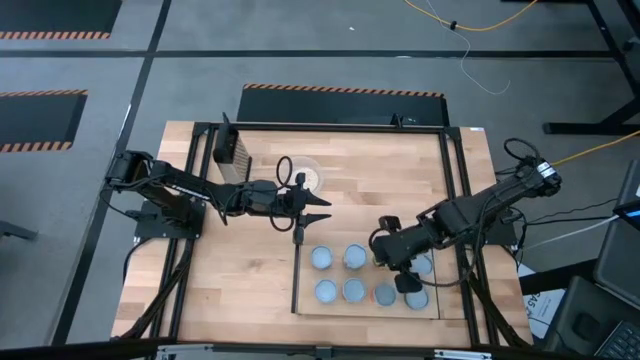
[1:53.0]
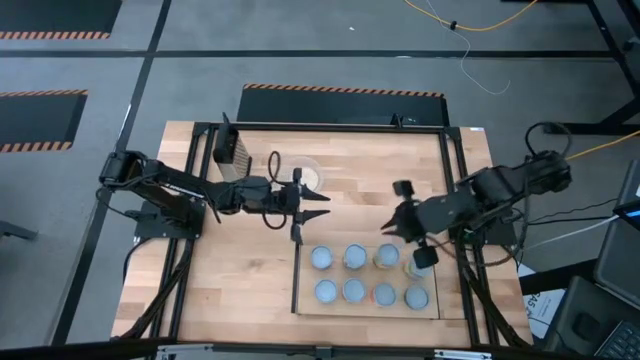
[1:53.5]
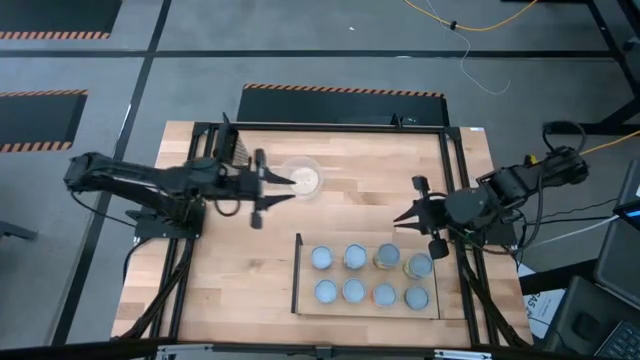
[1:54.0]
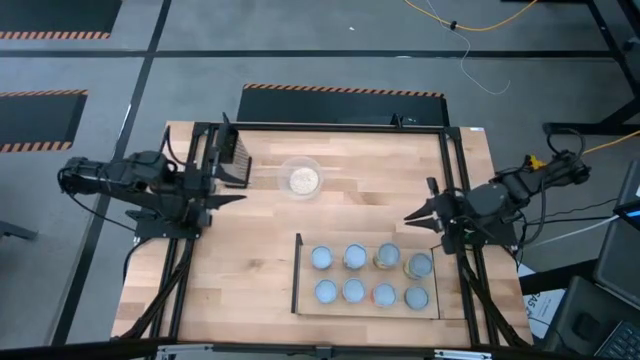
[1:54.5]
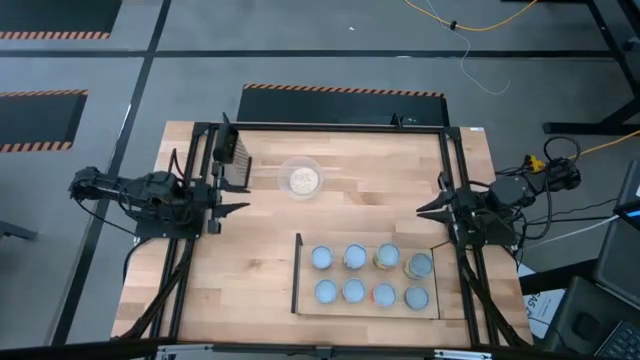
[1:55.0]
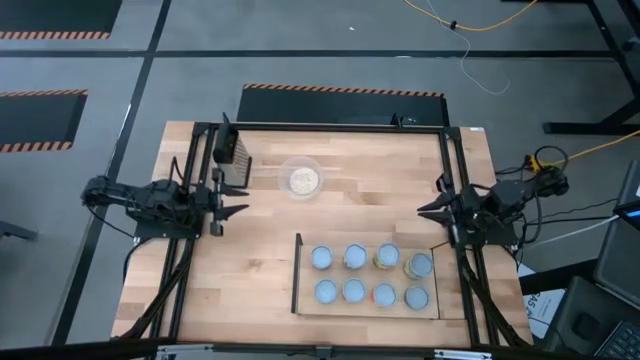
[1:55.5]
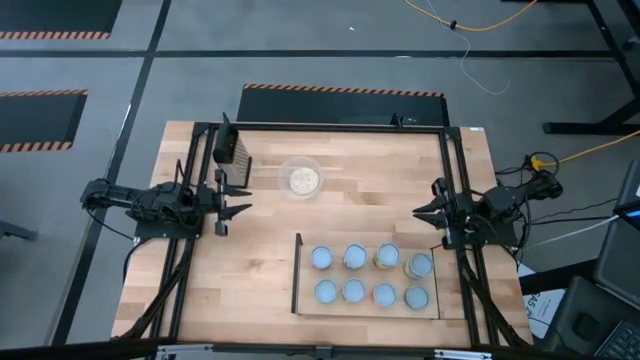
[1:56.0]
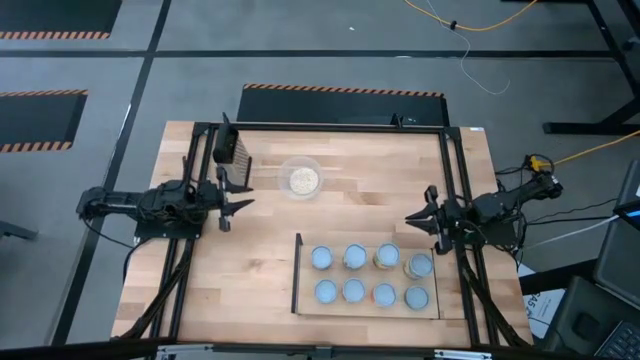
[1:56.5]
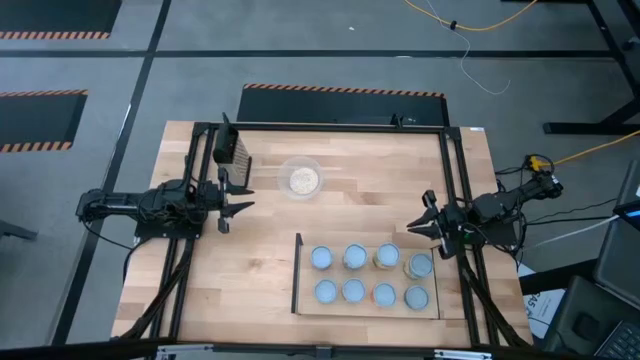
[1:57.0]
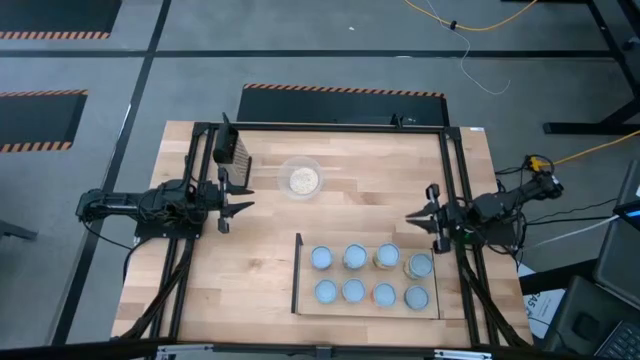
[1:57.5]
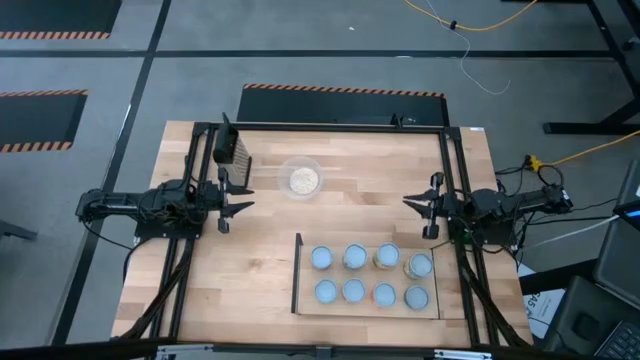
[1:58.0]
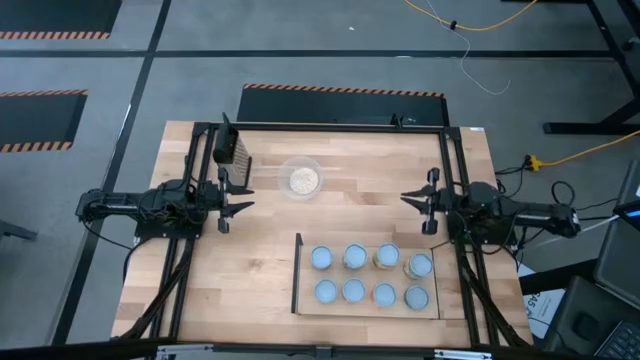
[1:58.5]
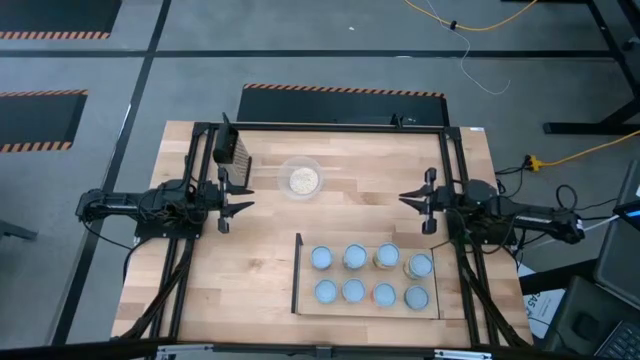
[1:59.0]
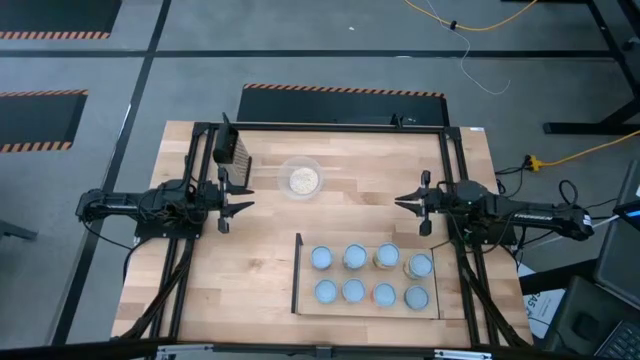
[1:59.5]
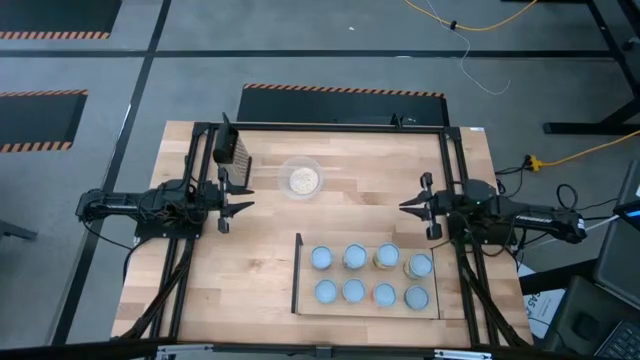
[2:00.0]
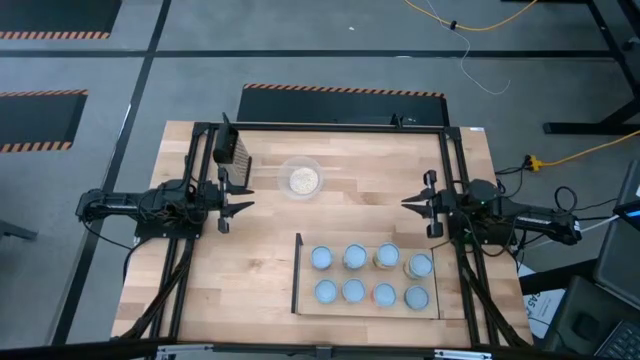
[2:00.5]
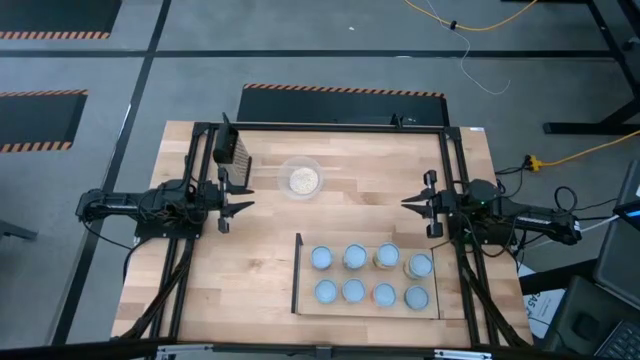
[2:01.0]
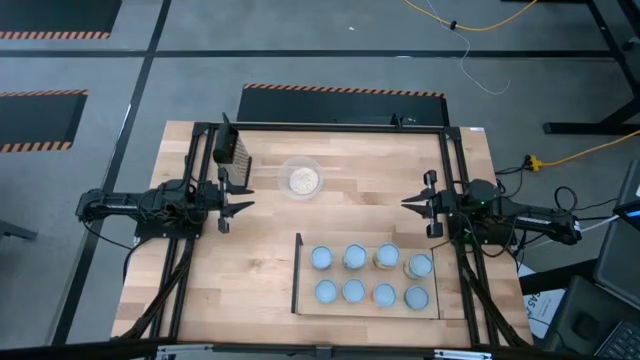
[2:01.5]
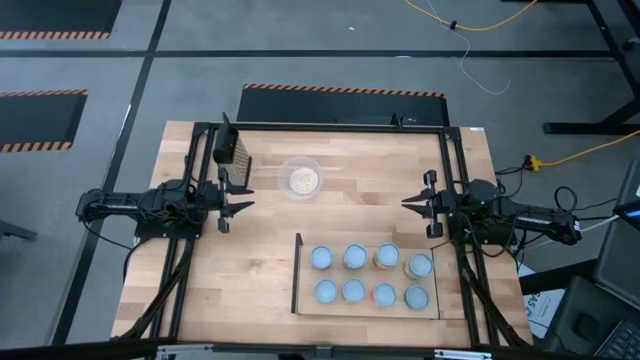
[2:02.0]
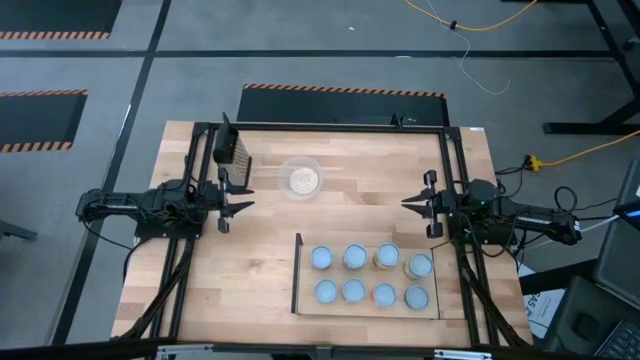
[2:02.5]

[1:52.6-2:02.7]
Task: Pick and place cans onto a shelf
Return to Home Position

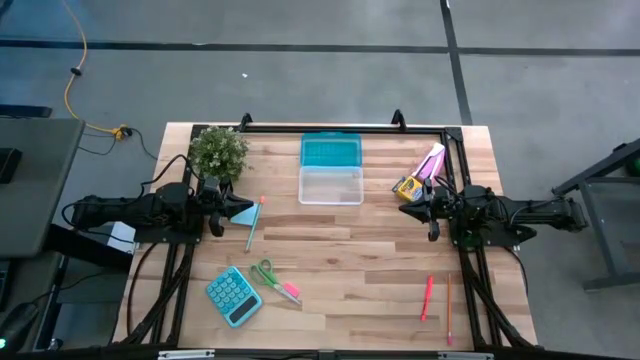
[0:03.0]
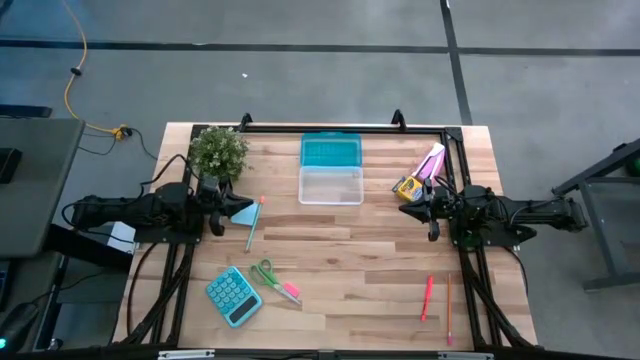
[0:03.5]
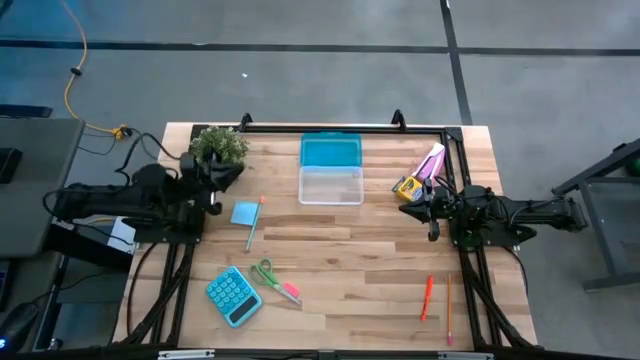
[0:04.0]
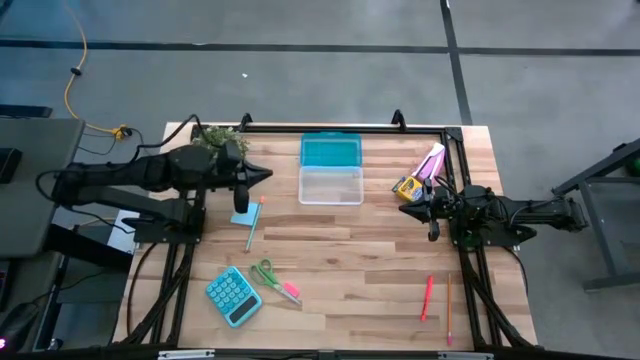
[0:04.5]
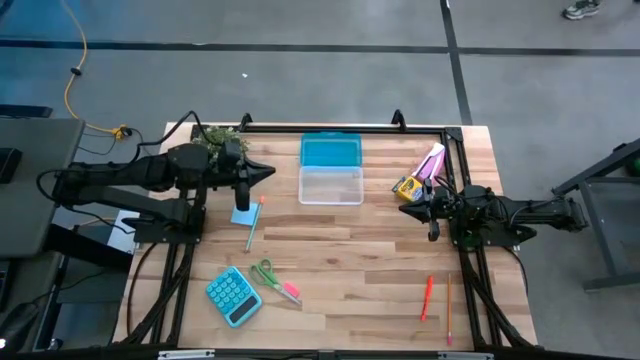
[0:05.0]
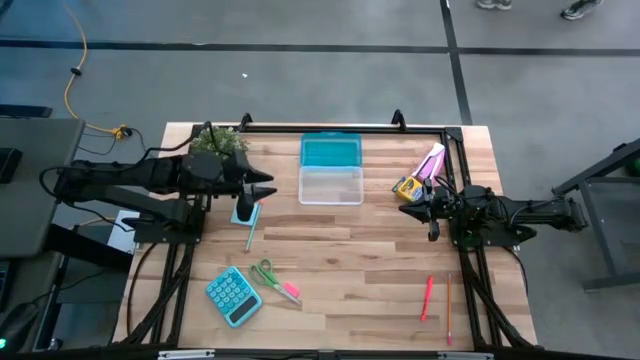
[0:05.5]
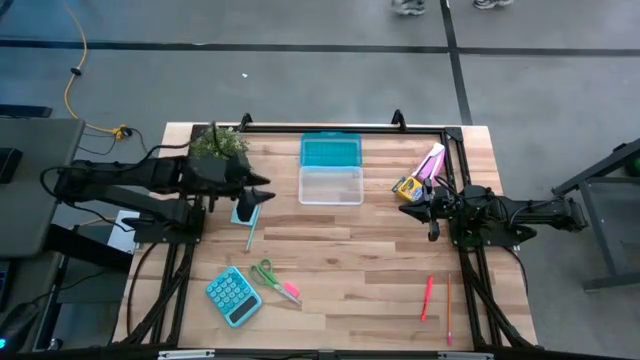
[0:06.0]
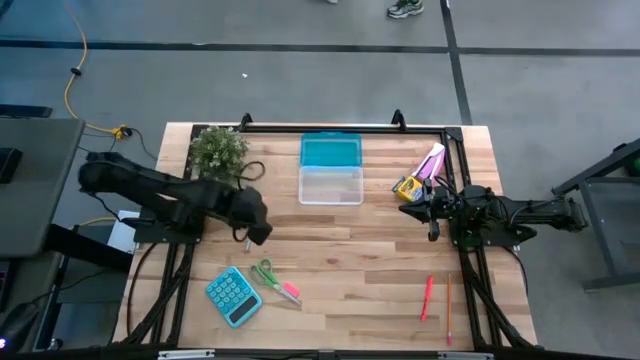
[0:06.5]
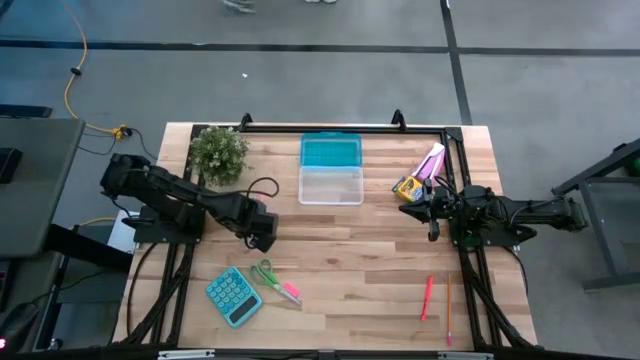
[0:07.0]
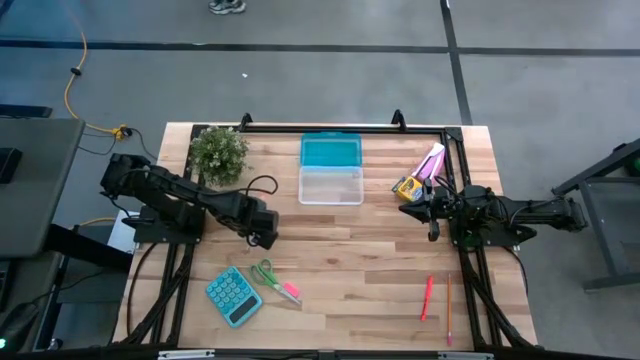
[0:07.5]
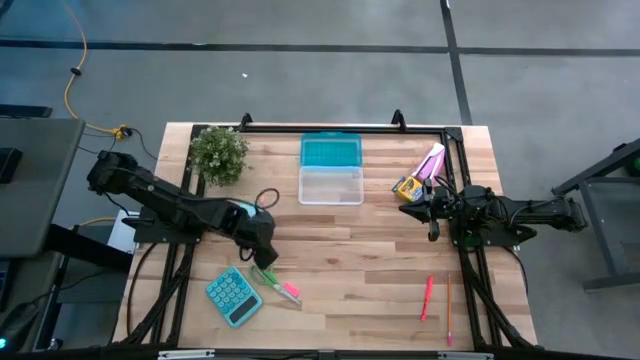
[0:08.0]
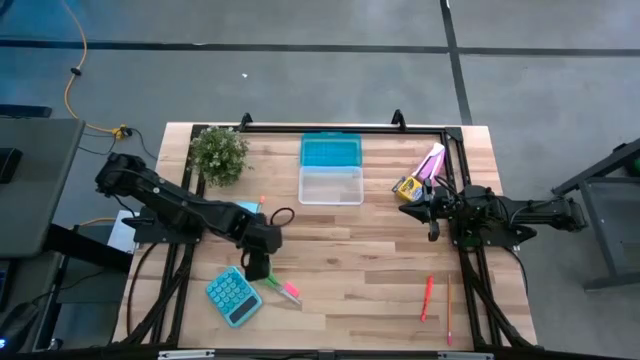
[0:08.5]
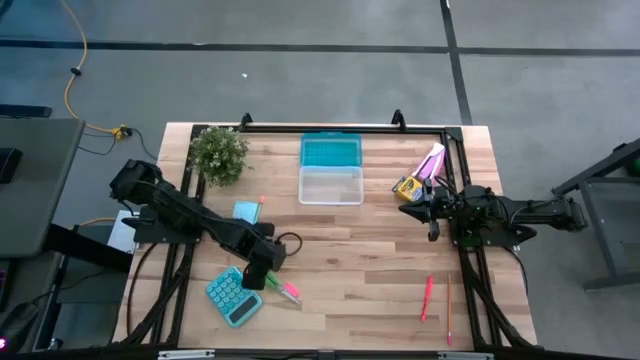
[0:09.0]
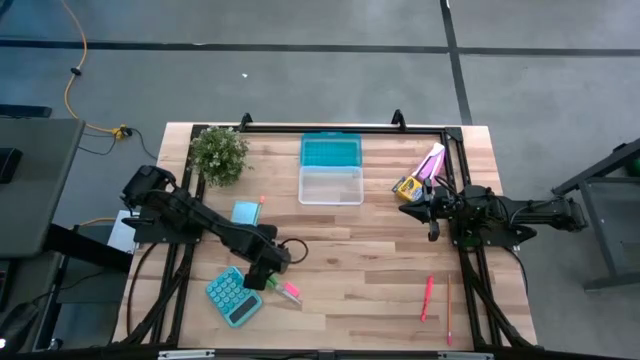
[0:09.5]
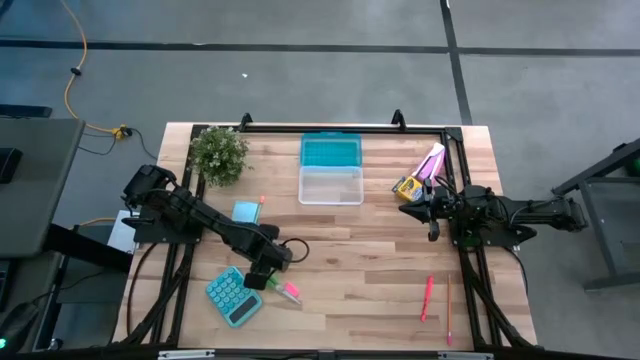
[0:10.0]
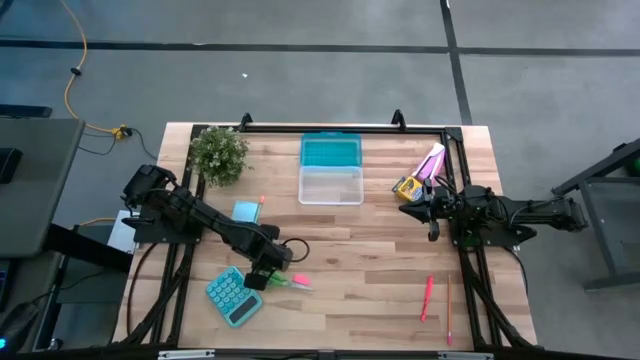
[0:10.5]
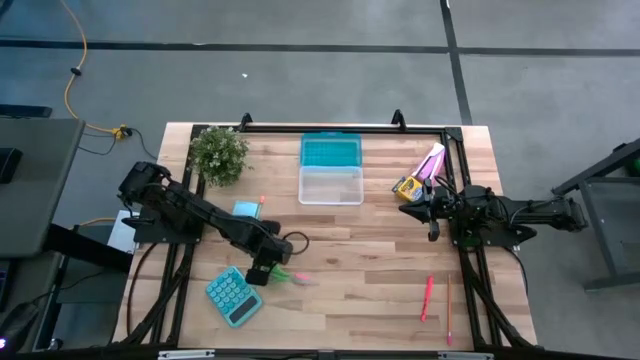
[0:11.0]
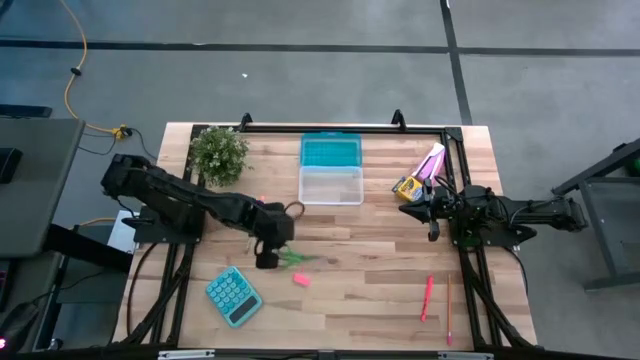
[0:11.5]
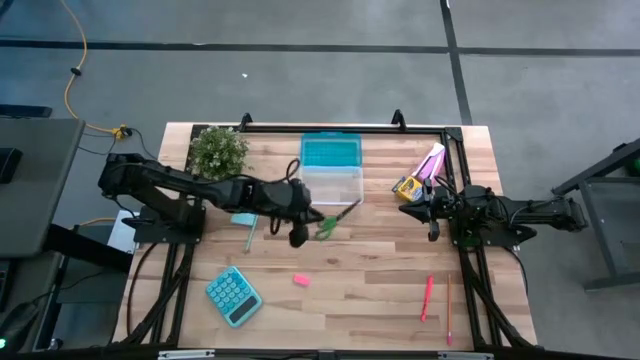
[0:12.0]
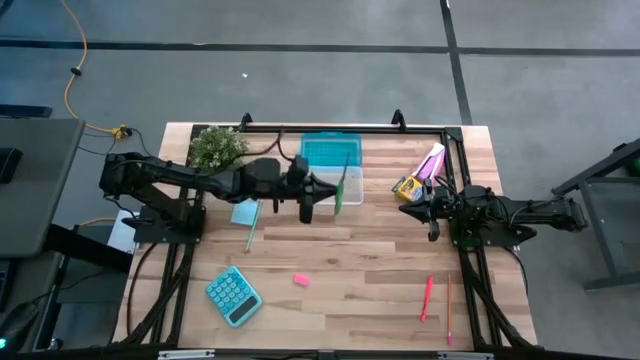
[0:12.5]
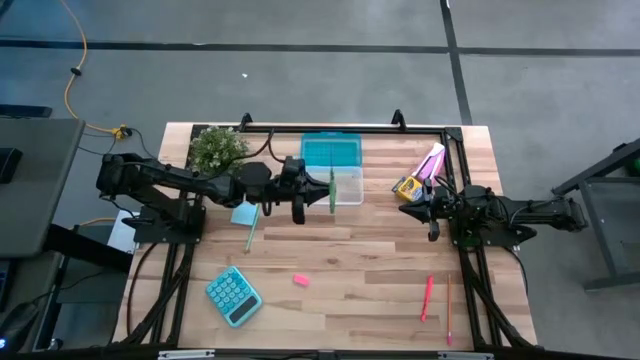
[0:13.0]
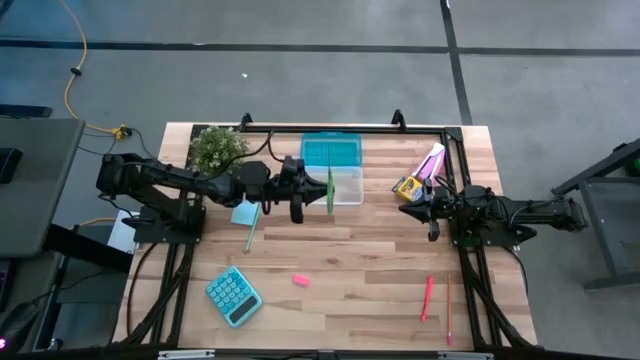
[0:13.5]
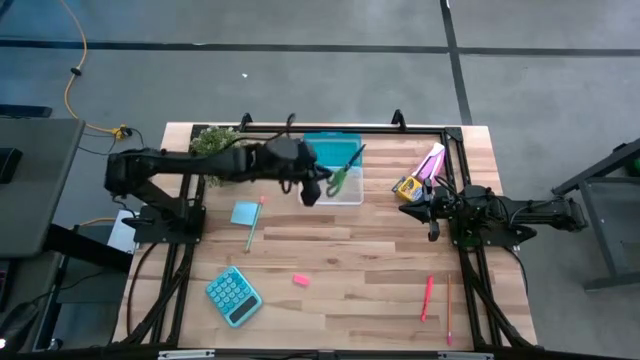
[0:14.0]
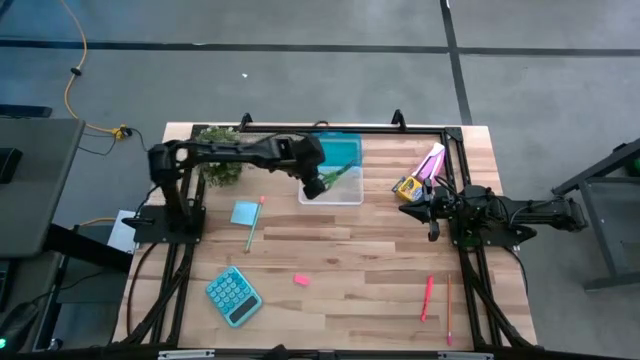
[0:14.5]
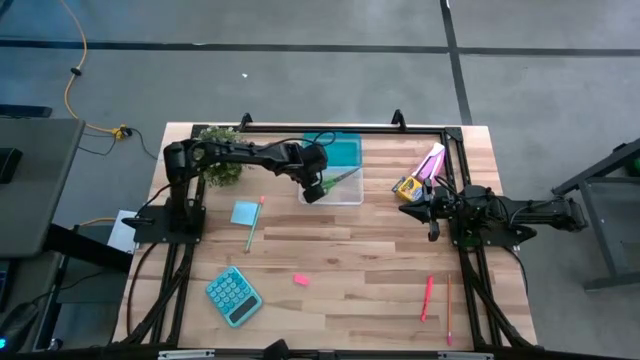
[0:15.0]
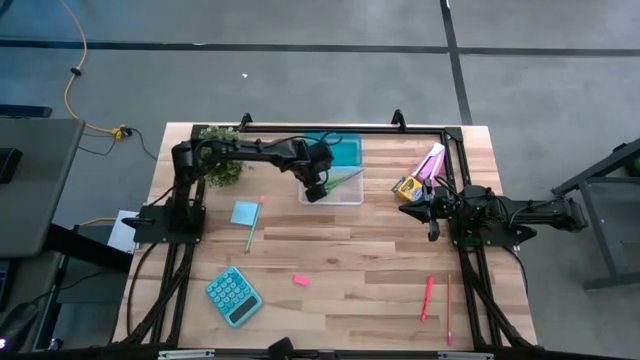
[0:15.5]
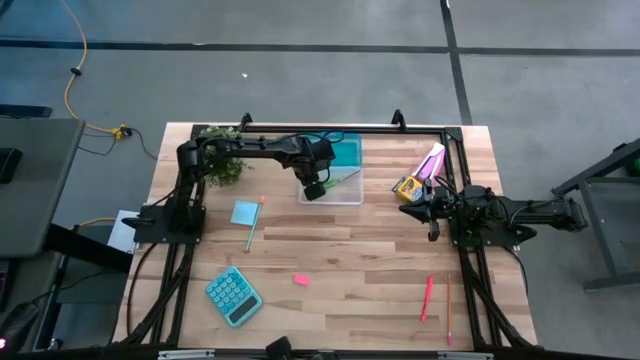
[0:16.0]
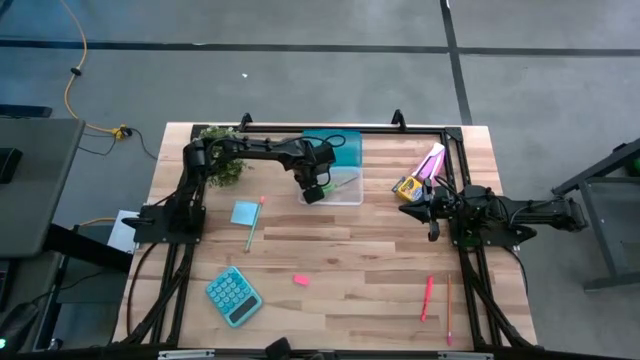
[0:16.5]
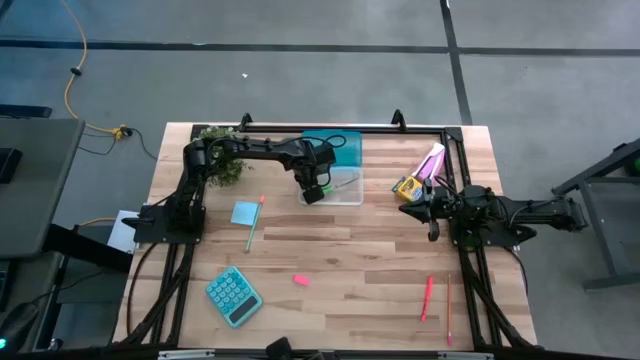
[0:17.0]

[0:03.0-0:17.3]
Task: Pack school essentials
Put the green scissors into the supply box
